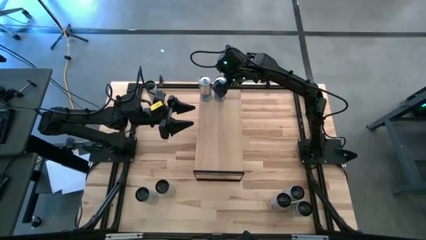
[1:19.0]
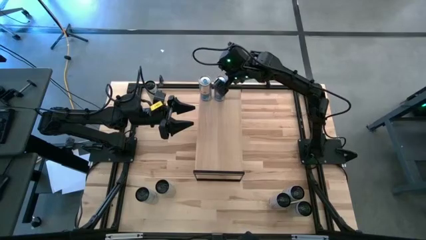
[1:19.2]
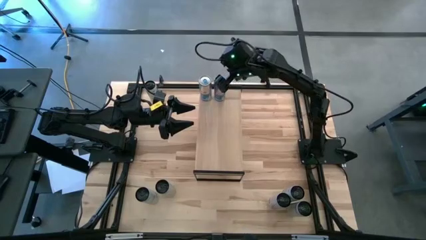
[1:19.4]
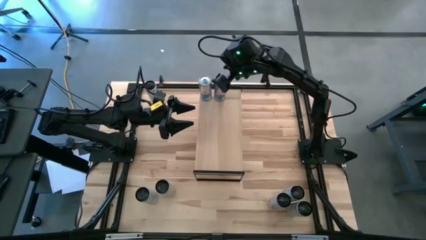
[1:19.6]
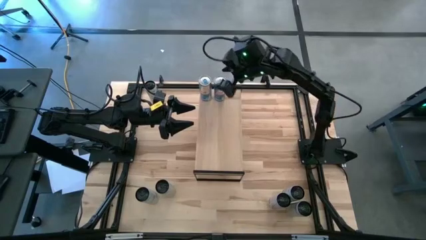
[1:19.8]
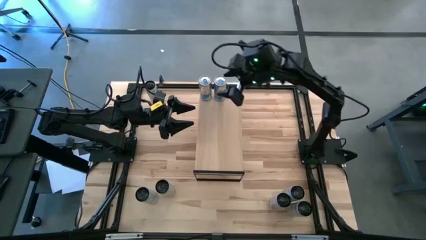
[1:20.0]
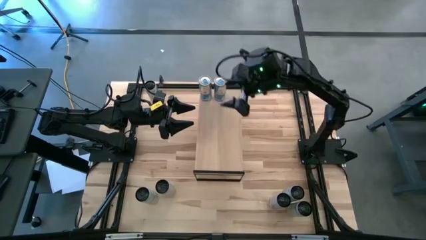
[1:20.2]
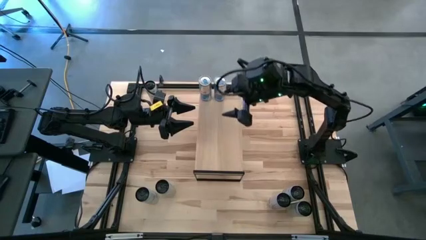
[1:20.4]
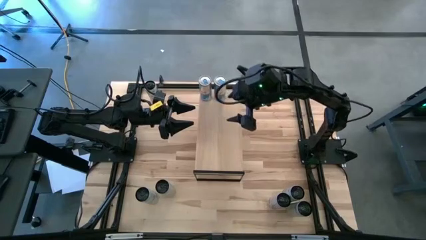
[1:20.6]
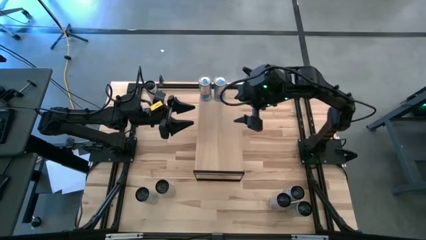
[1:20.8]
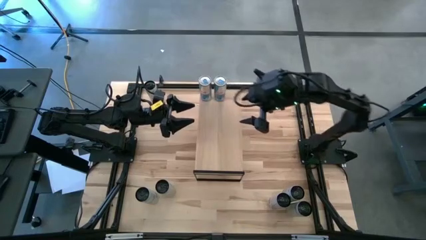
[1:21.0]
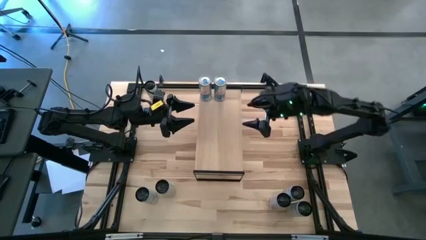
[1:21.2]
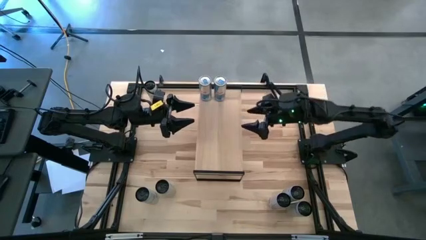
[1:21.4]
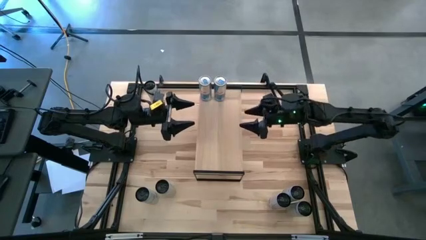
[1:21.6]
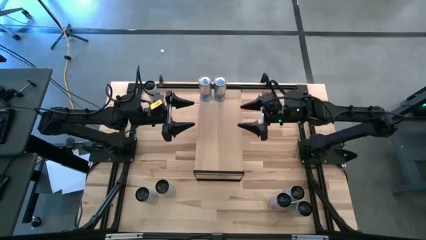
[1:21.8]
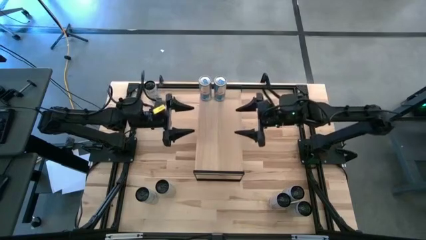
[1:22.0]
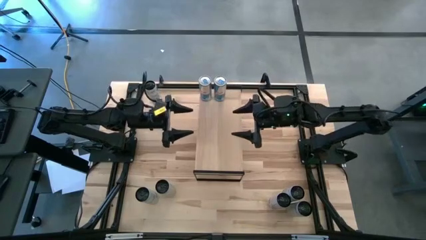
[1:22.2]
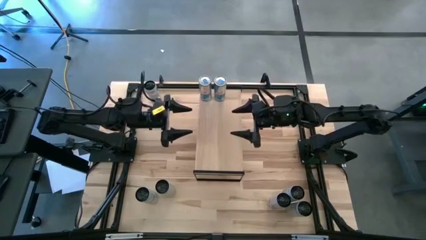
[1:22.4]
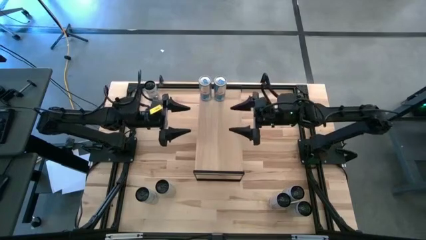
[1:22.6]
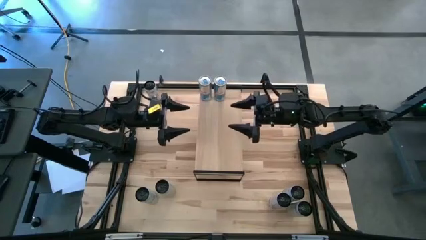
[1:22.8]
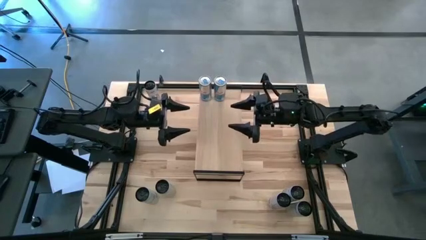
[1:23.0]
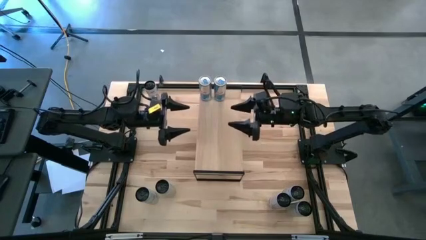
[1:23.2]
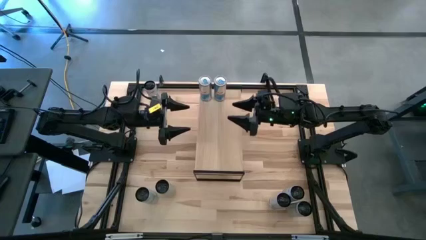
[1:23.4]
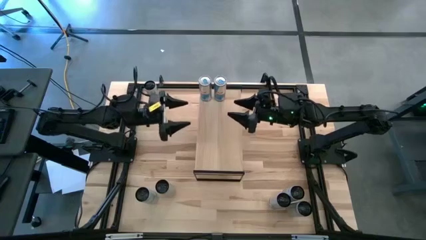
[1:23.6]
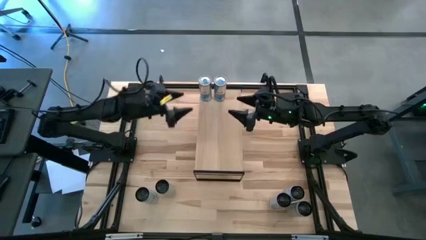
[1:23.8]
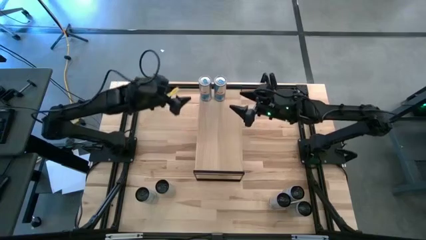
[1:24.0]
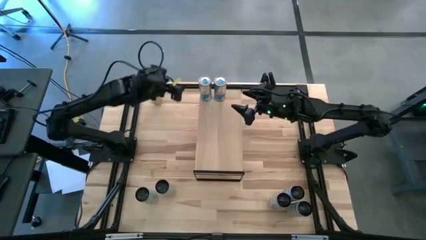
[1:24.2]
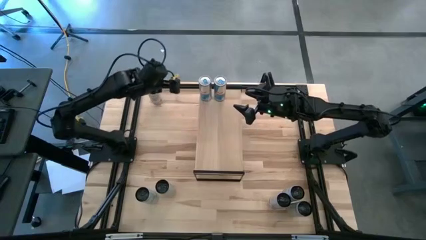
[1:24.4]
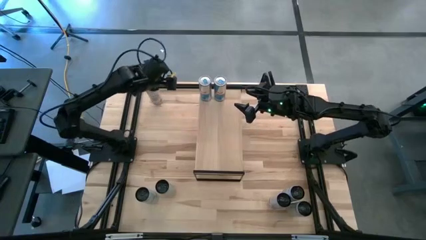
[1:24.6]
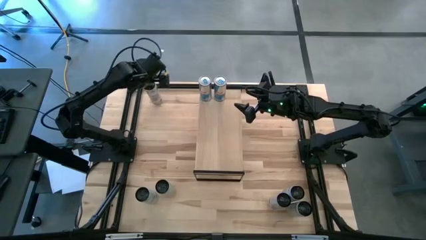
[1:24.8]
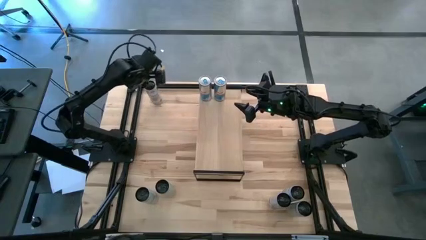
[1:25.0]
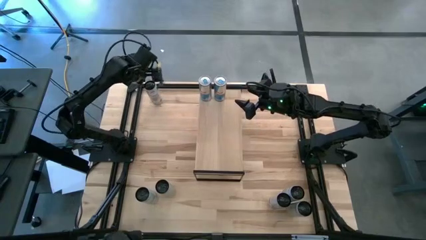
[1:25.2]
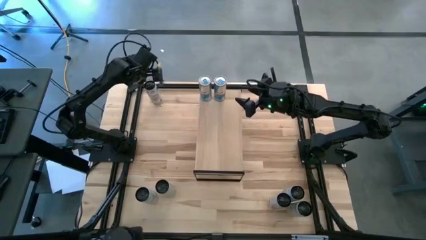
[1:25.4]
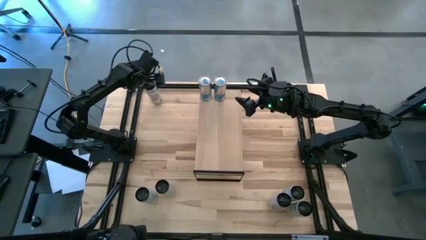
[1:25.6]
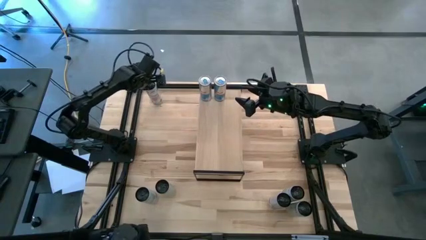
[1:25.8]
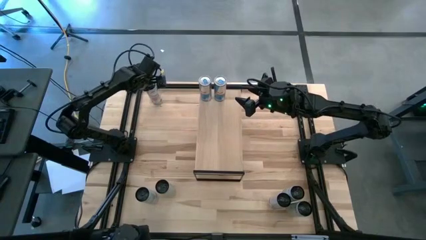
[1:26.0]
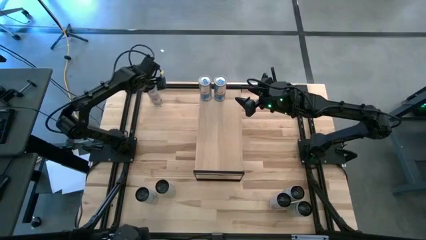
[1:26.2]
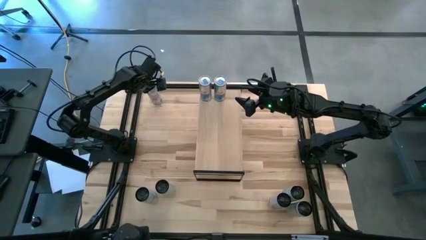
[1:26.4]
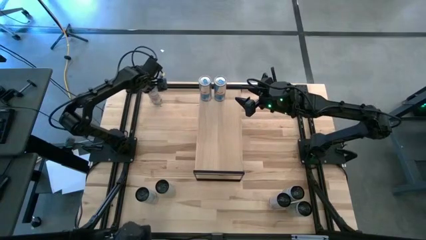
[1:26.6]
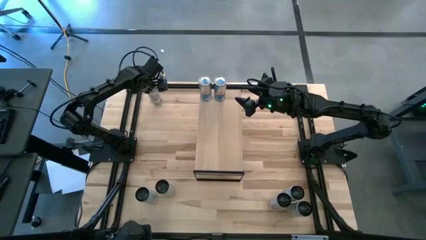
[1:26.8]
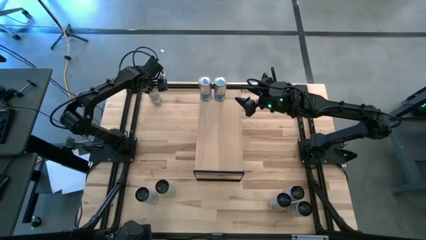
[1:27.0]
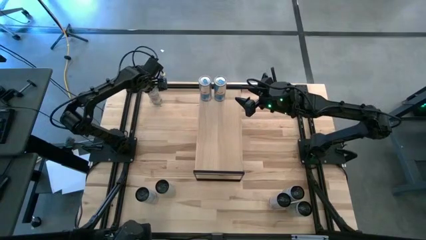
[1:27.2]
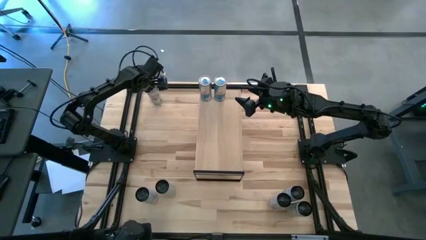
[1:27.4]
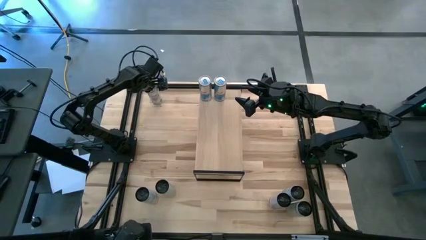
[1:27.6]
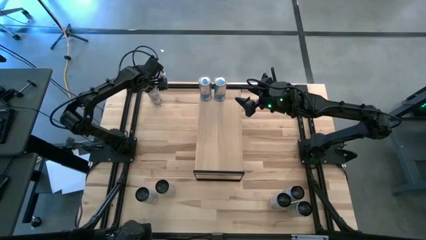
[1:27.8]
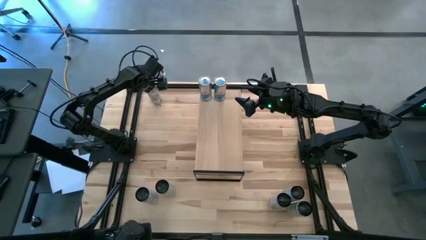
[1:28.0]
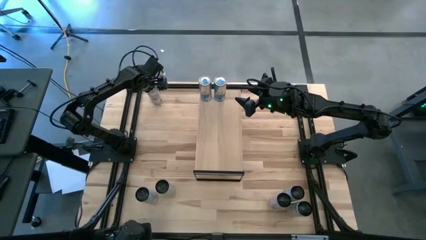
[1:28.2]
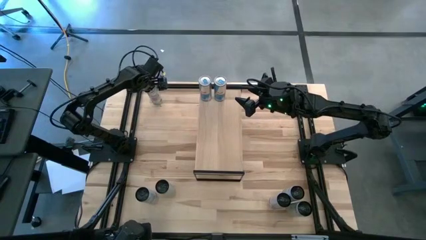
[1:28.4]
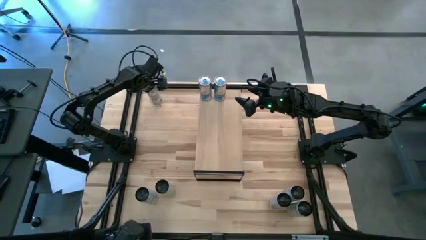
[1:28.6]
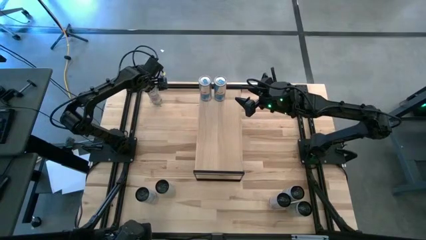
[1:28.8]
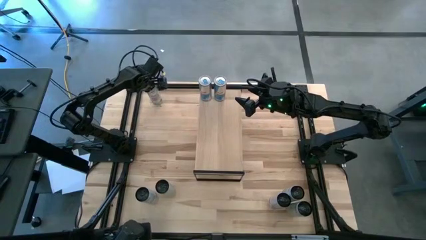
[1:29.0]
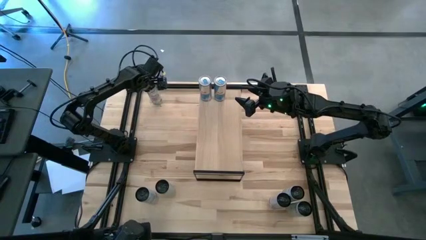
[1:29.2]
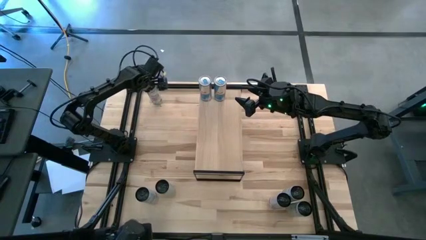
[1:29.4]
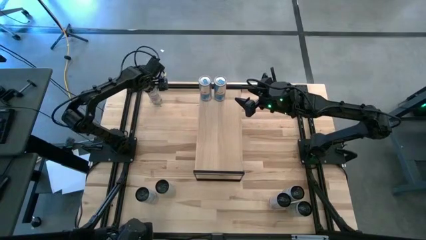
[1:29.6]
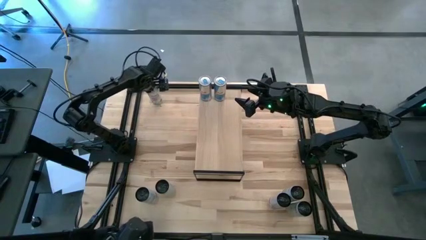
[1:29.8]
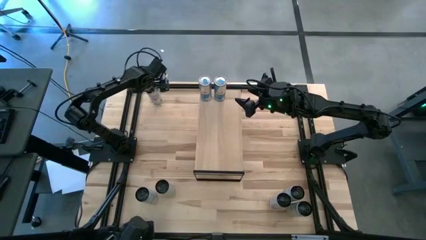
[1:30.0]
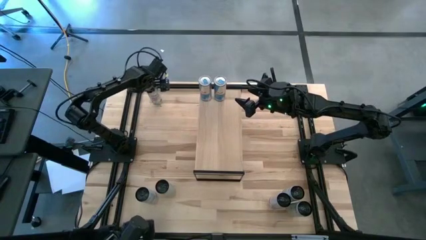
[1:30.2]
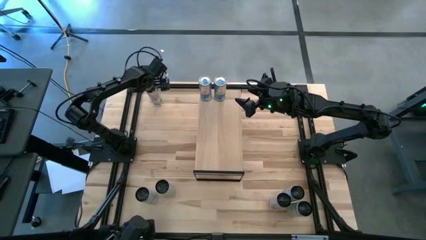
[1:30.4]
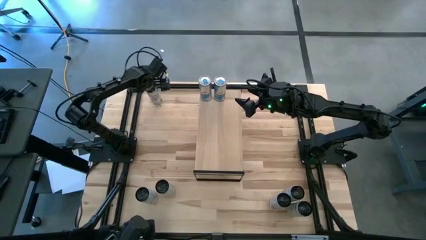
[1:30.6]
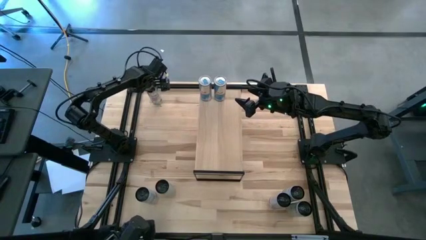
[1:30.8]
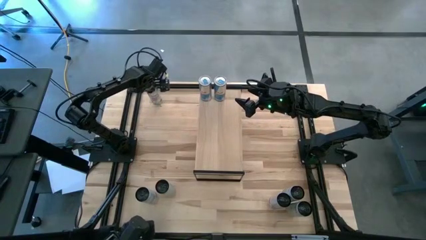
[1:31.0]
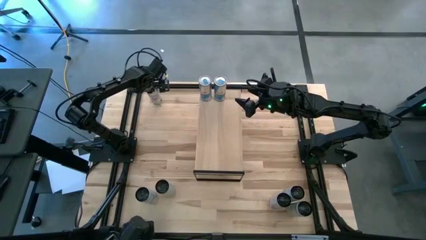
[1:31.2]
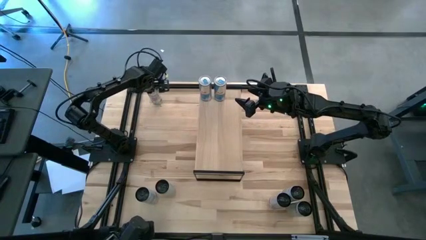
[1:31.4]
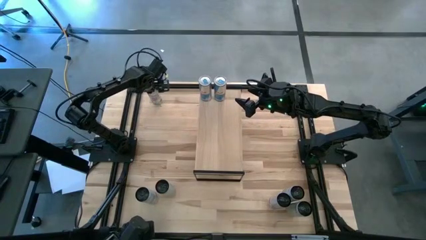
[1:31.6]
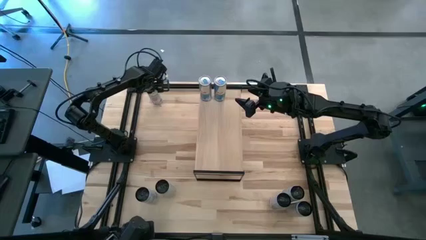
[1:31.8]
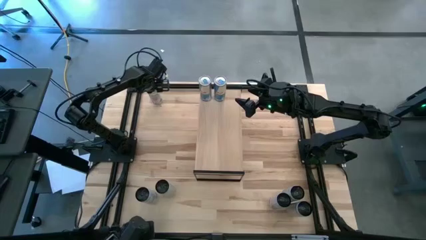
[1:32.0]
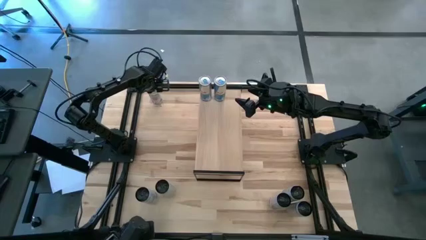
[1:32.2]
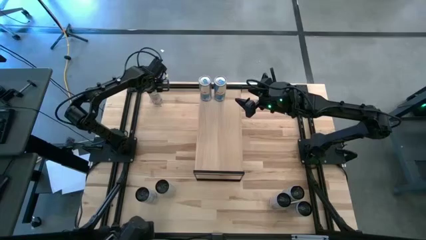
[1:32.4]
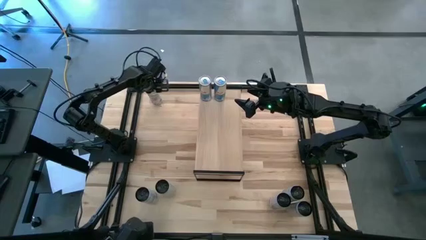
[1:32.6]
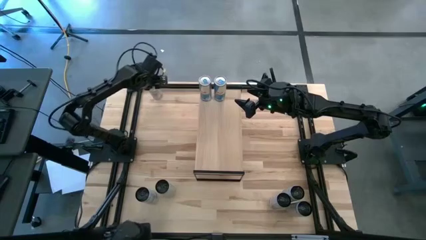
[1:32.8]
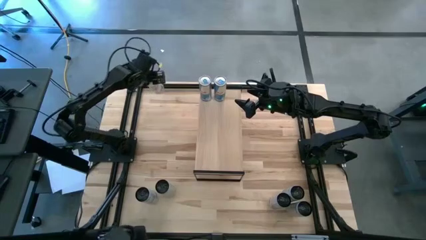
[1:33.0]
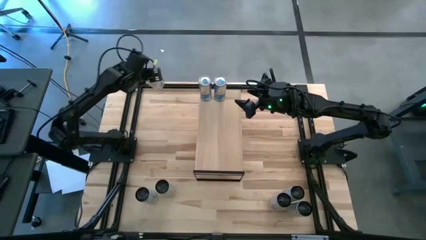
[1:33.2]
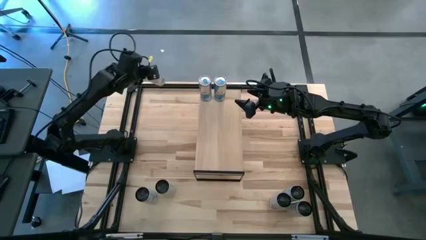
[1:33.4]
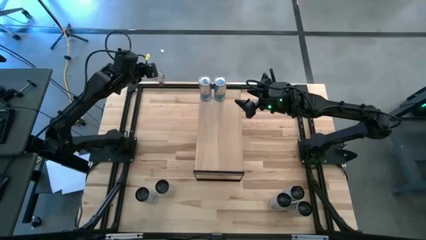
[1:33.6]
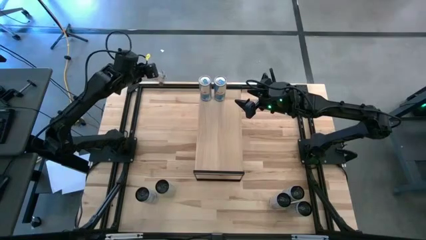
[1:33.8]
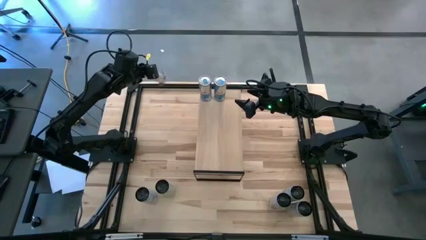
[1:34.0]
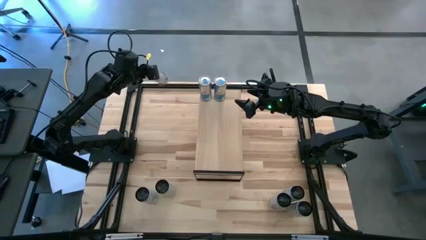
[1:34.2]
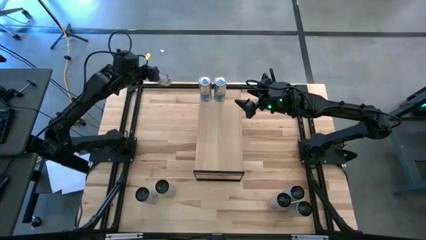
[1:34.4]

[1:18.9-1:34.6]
Task: Place canned beverage on shelf
Put the top white pink soda can on the shelf
